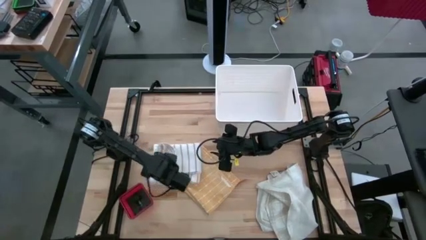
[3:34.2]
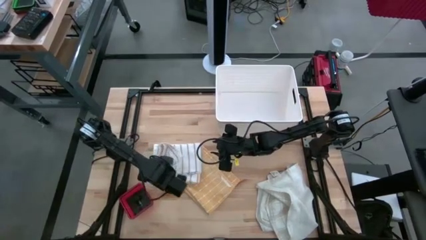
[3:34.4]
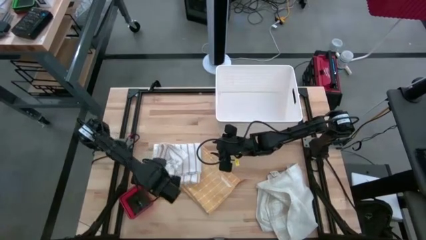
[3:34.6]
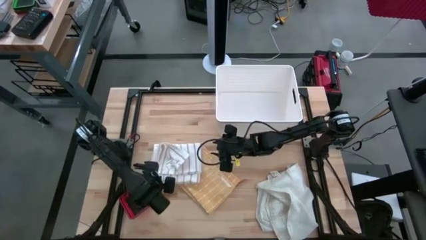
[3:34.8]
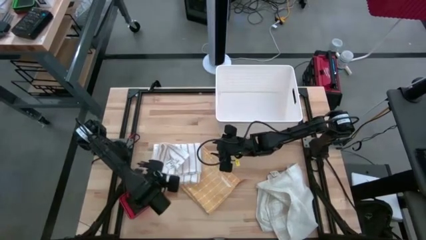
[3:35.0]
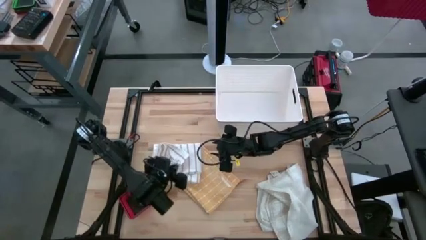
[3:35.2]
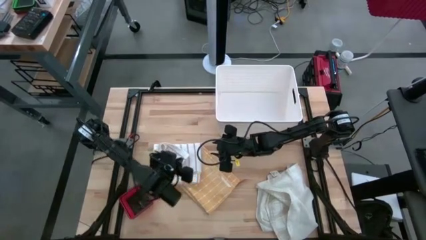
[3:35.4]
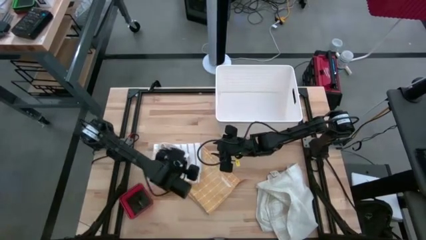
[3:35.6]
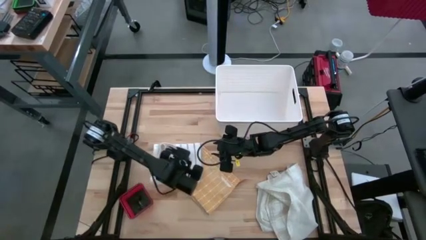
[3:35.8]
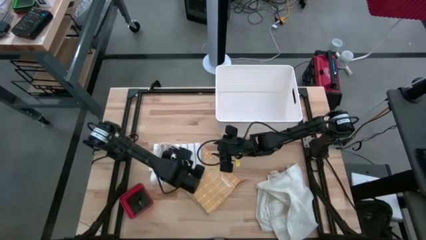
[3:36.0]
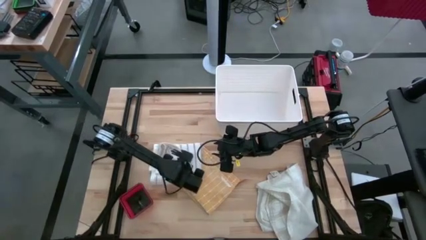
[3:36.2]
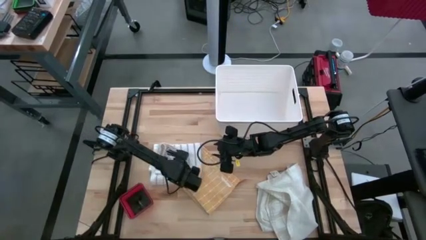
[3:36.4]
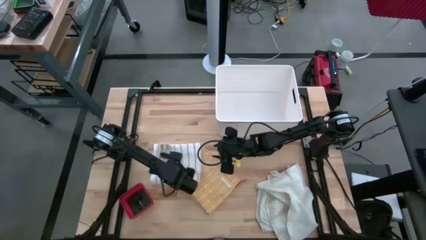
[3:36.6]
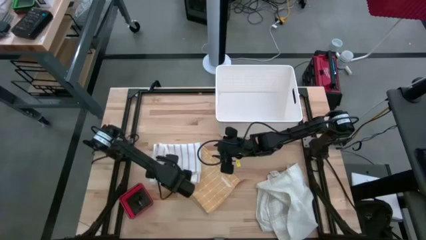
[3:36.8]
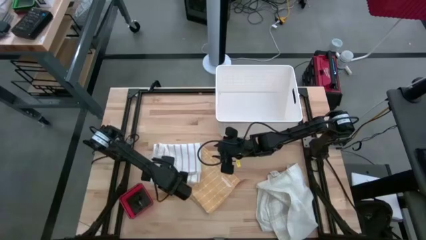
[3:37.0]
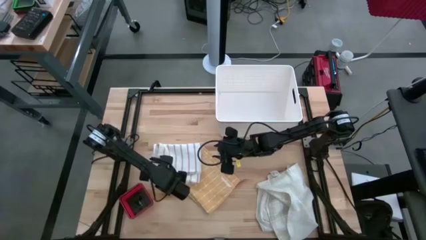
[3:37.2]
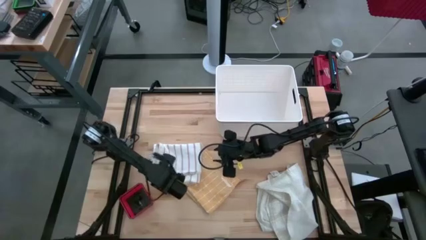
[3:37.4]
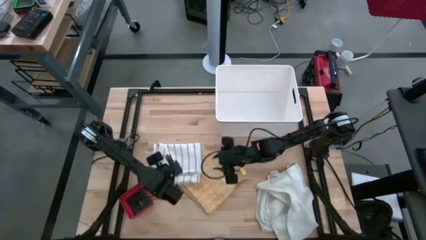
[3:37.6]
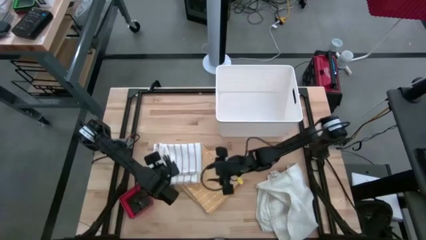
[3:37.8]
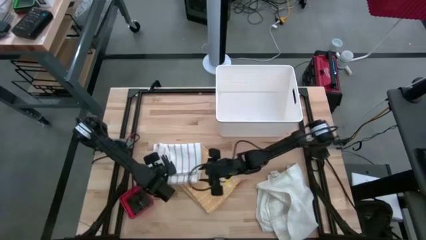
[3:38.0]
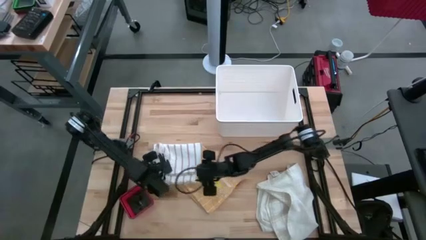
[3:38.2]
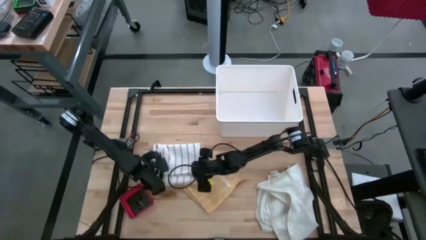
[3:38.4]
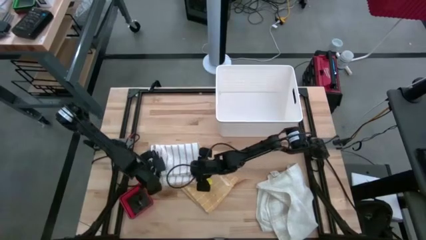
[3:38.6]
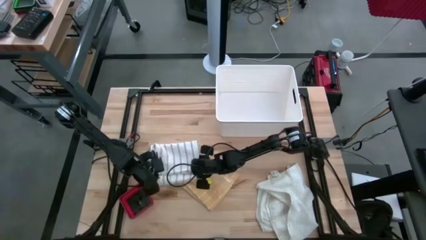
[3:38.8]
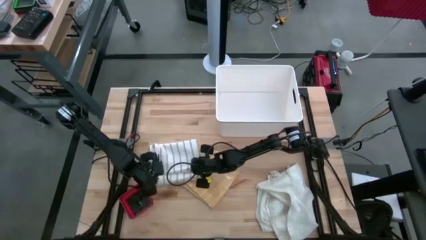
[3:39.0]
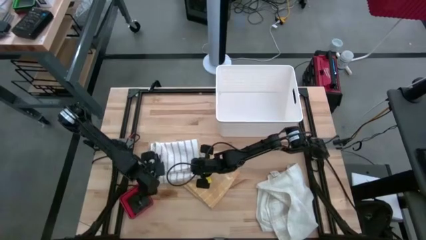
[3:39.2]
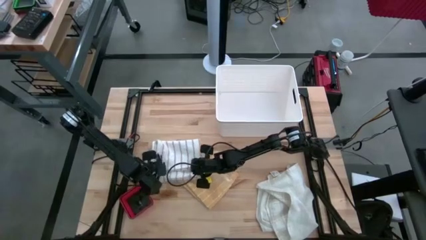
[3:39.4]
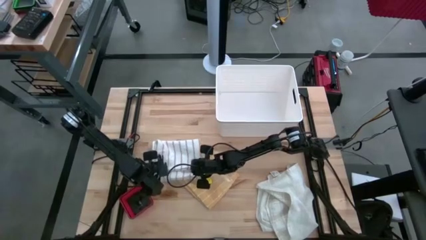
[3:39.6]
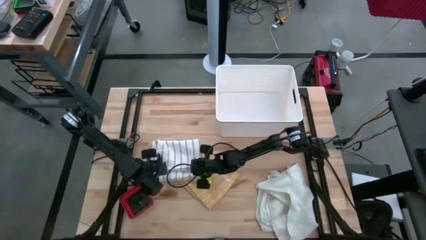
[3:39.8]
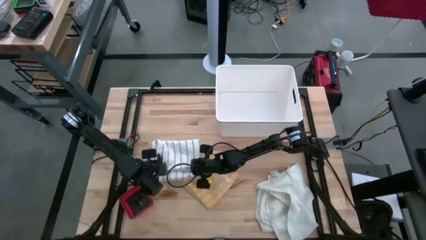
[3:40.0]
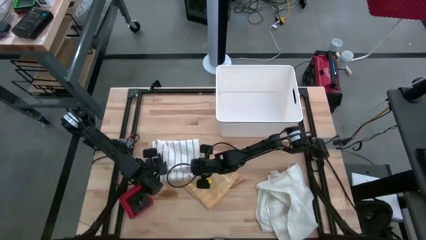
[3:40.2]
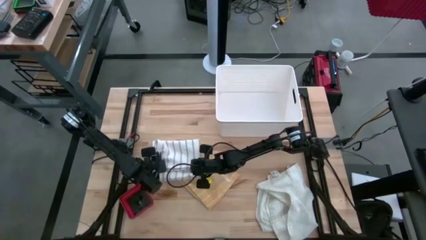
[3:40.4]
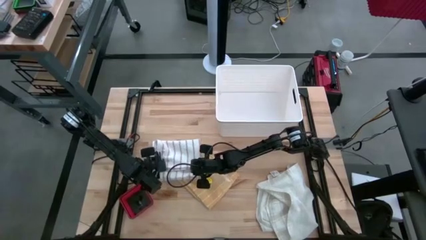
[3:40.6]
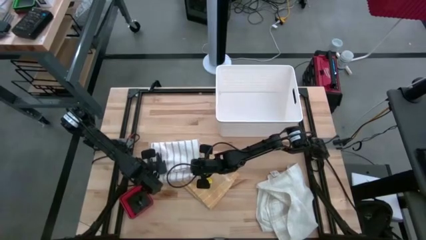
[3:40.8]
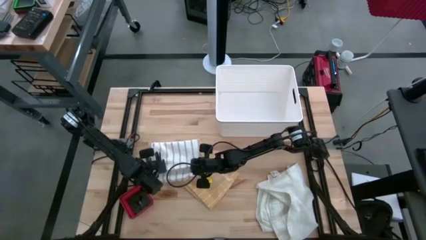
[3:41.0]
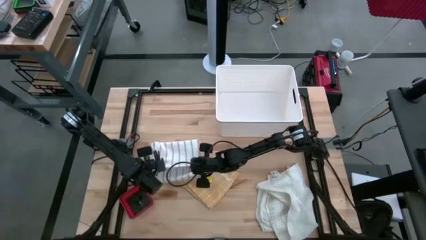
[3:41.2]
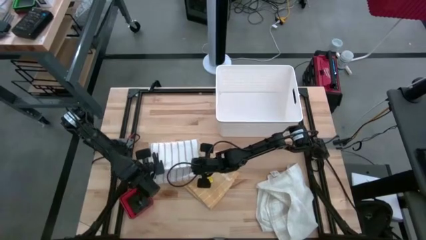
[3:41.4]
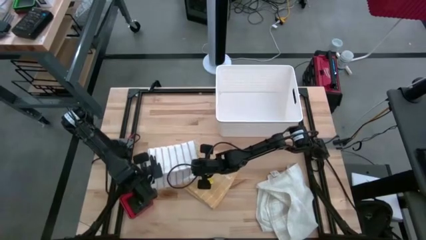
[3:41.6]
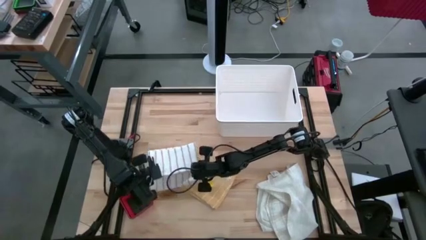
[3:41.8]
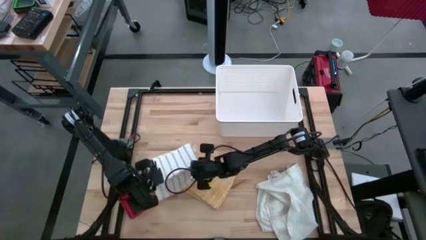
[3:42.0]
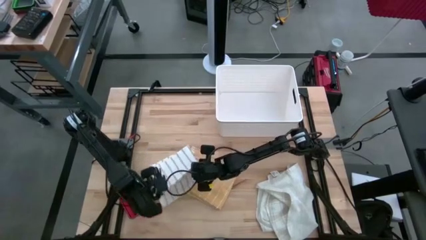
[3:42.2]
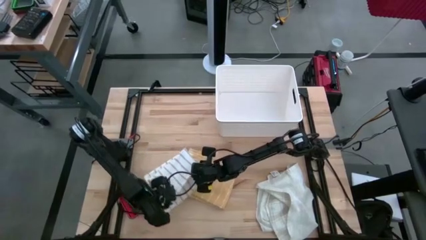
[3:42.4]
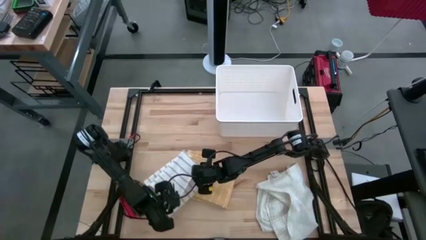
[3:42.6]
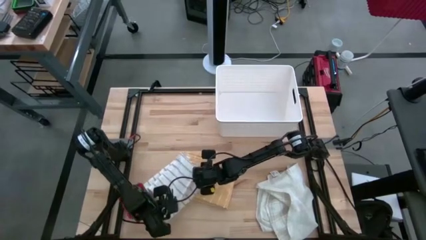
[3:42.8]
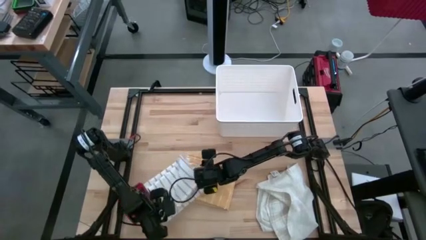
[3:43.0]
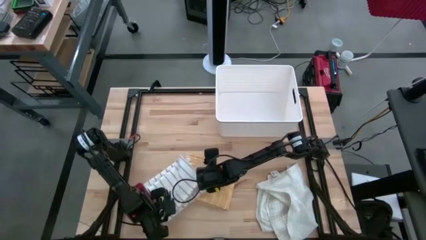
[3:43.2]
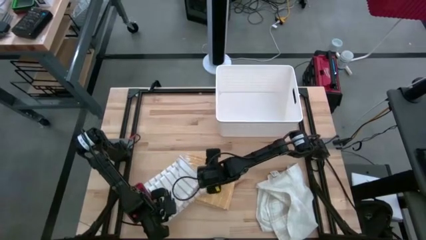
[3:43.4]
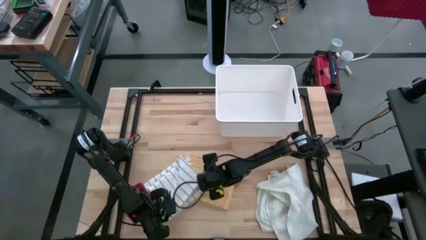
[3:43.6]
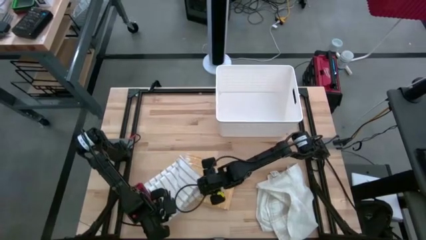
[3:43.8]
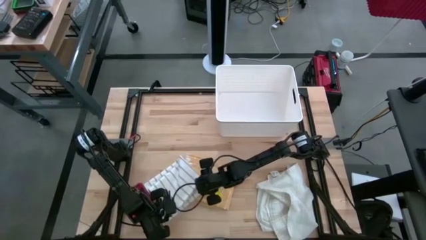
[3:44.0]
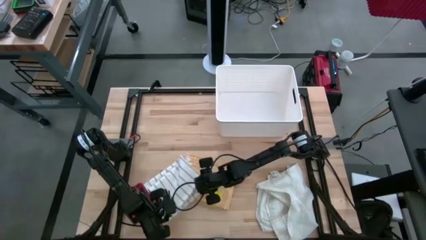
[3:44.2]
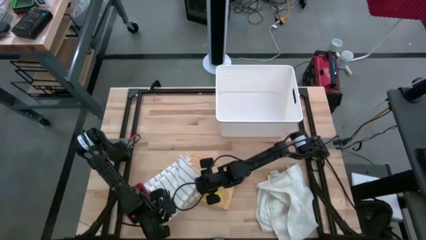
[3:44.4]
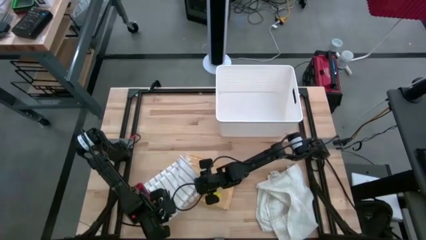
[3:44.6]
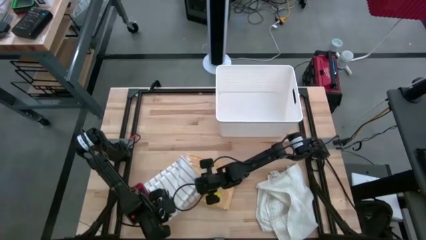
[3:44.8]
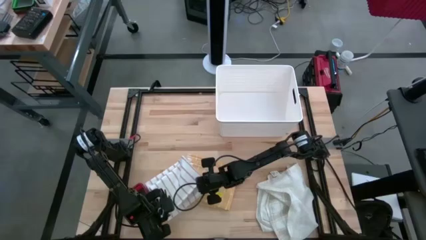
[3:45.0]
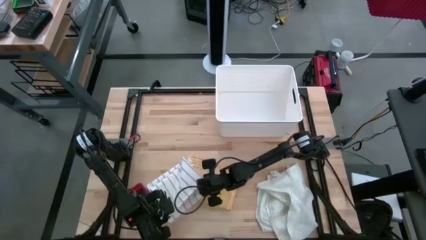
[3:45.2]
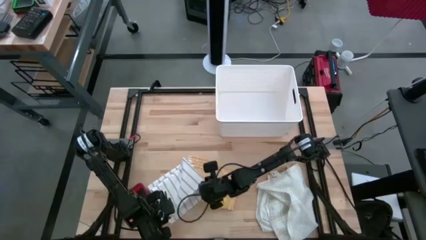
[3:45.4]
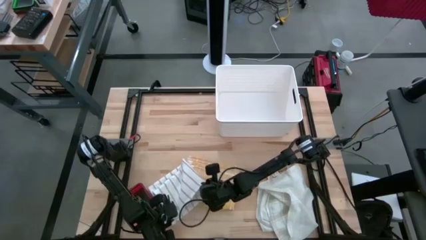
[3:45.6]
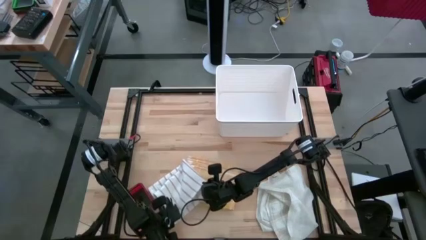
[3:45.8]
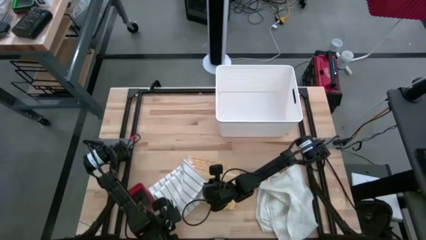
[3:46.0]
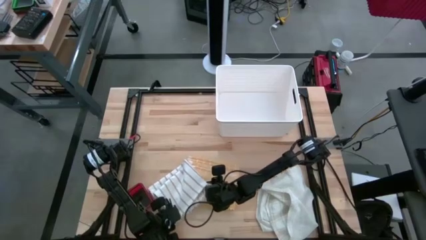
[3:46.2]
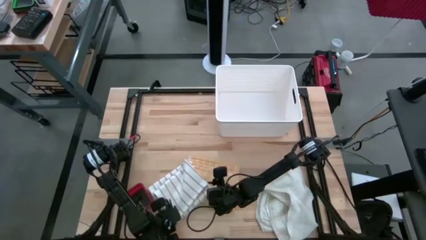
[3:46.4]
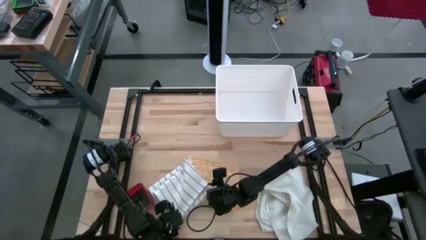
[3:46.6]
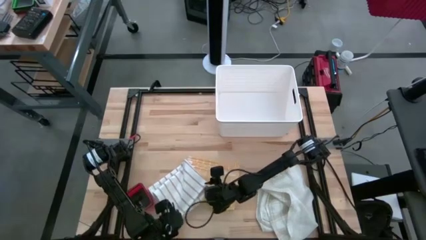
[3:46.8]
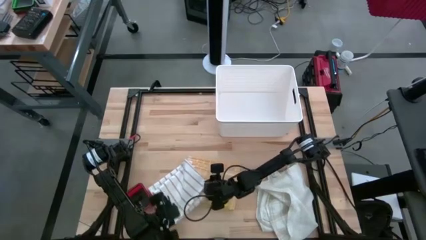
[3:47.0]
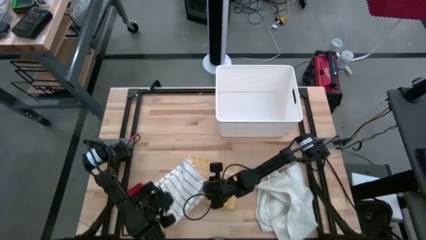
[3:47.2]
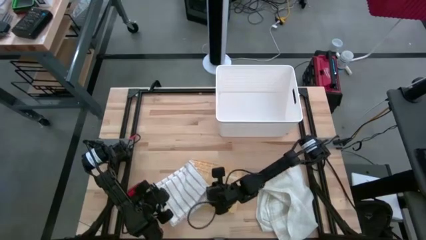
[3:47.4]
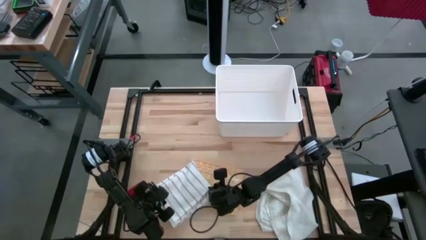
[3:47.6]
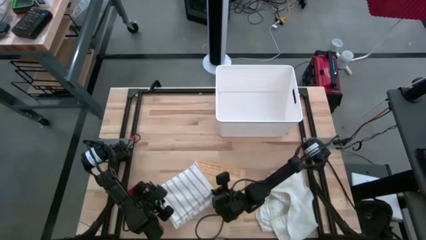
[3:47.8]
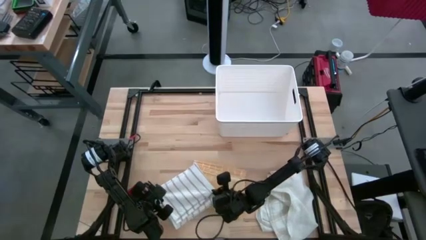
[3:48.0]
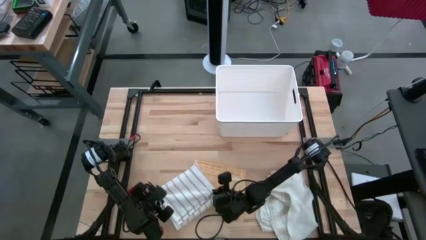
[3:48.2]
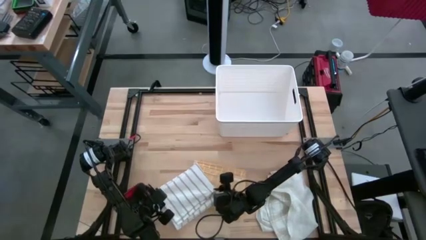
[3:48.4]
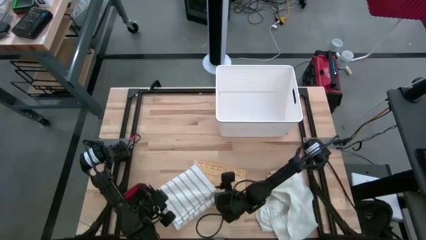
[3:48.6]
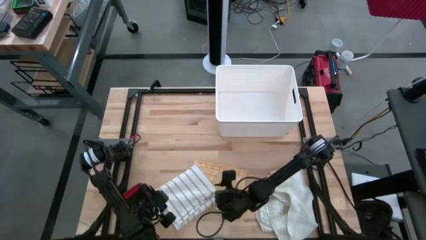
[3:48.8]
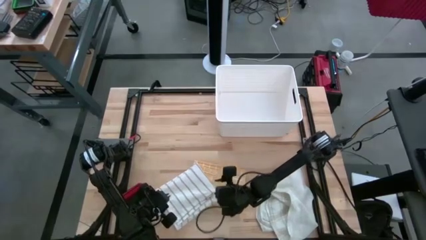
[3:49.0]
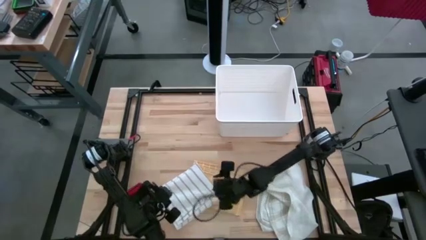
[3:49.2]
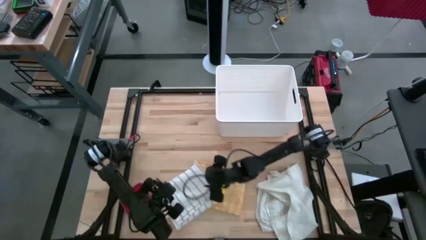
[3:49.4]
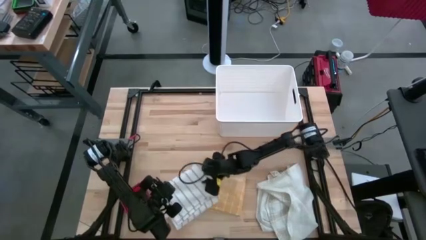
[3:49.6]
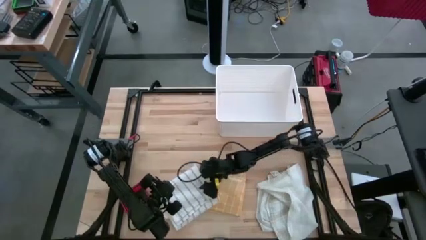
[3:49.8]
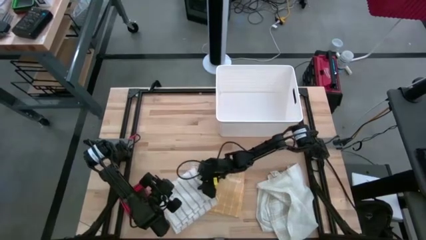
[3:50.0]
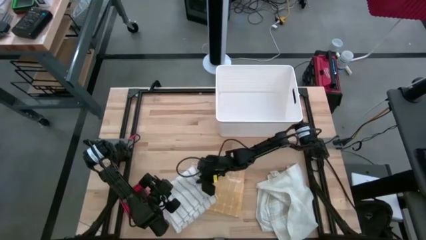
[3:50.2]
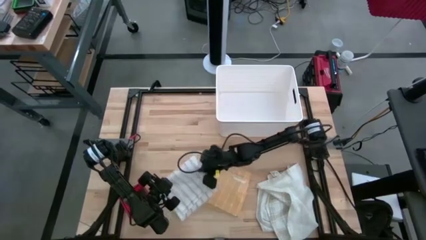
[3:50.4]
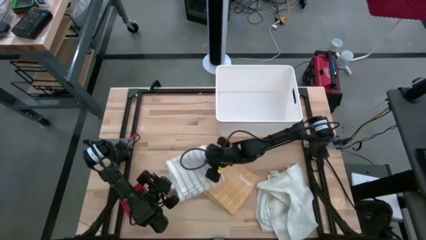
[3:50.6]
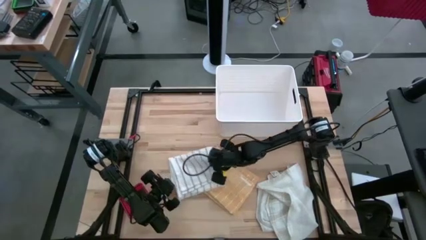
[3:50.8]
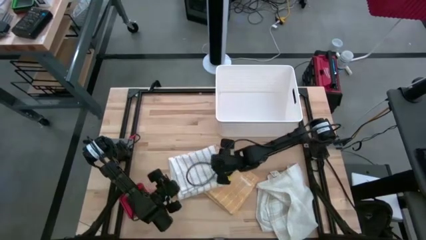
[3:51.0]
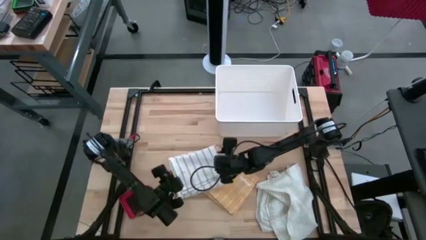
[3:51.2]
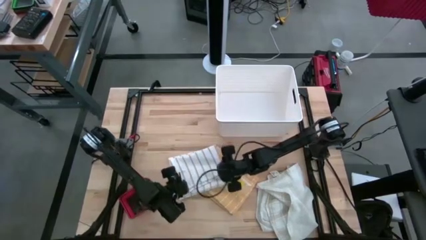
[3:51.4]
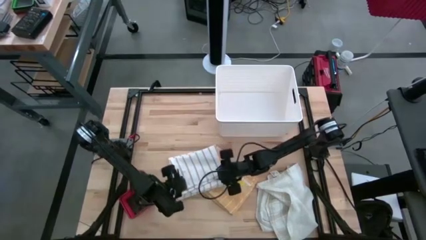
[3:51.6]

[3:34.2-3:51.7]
Task: Fold towel
Fold the brown patterned towel
